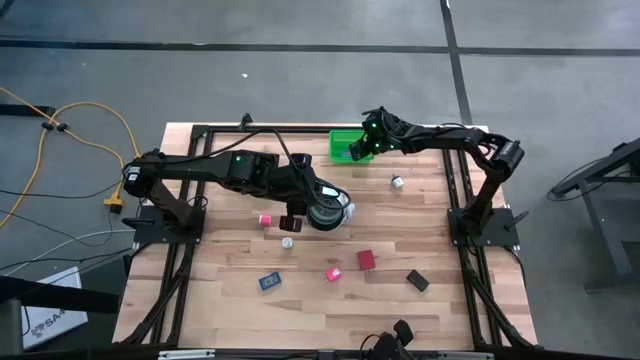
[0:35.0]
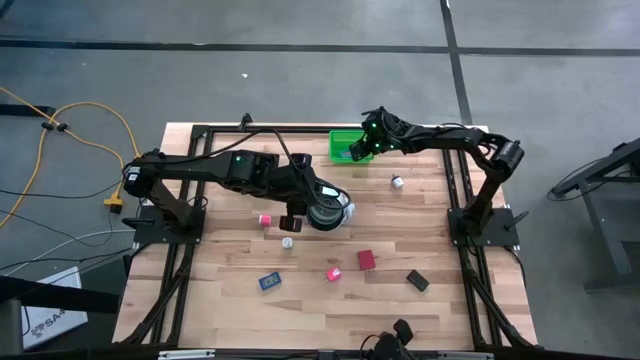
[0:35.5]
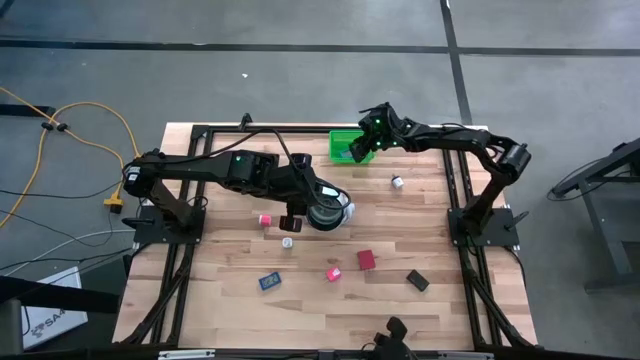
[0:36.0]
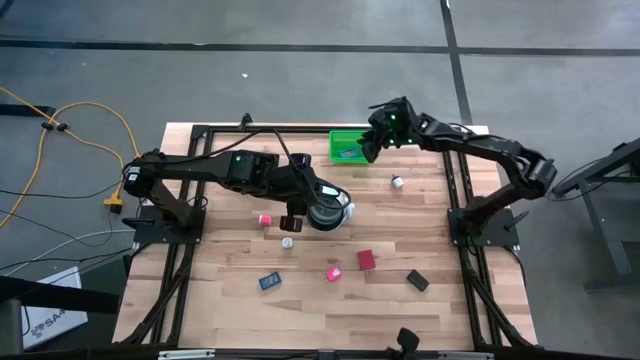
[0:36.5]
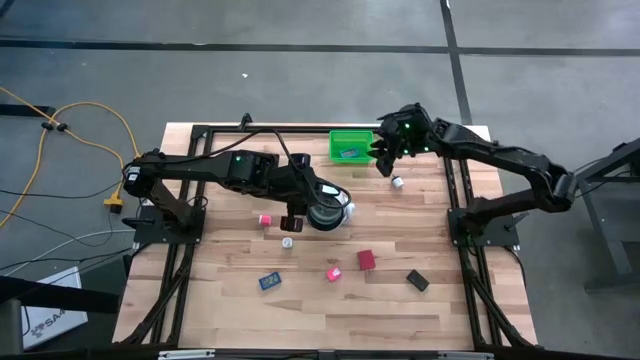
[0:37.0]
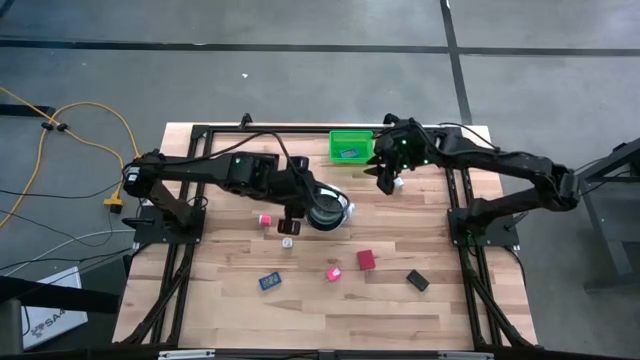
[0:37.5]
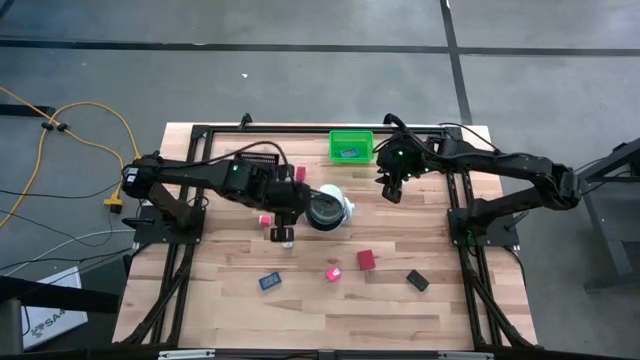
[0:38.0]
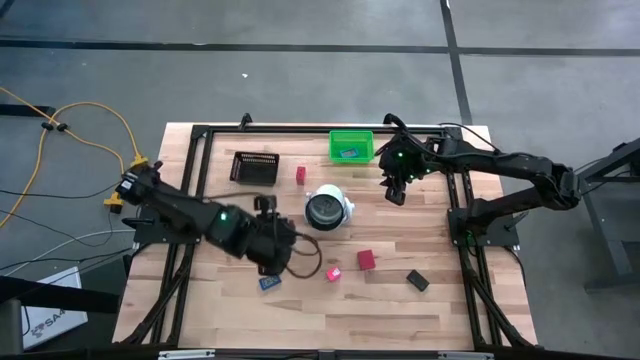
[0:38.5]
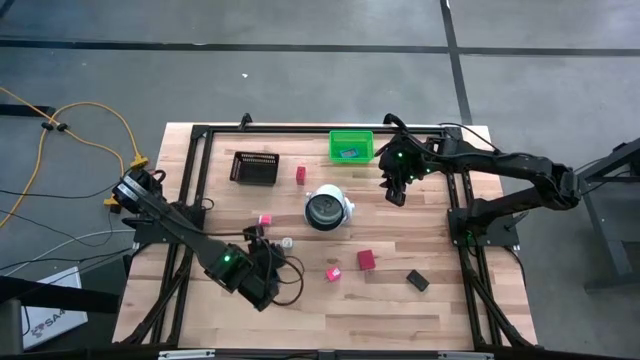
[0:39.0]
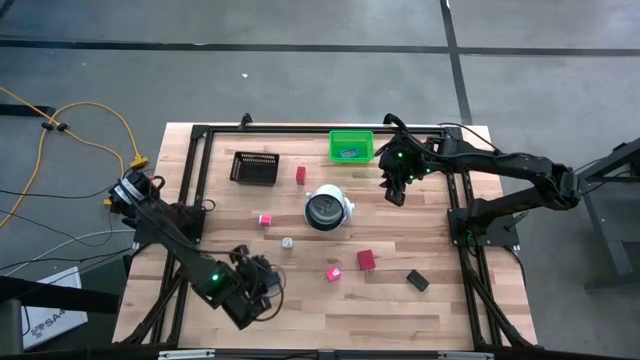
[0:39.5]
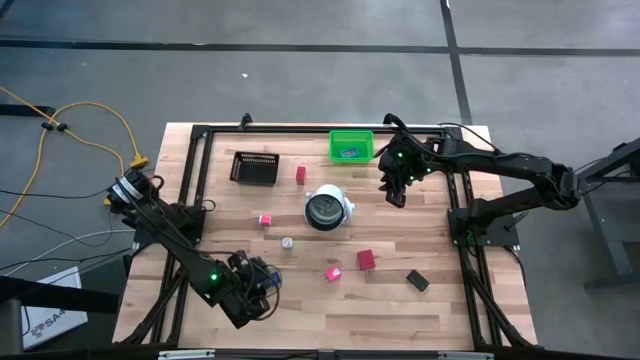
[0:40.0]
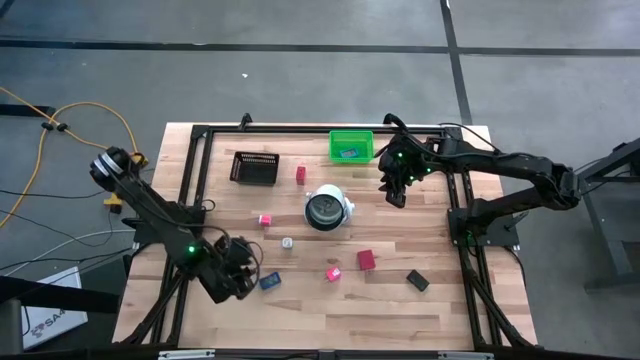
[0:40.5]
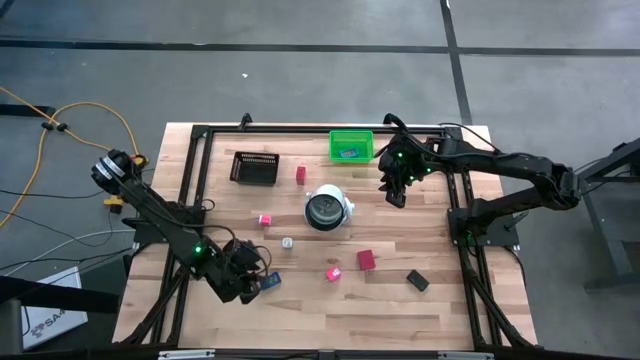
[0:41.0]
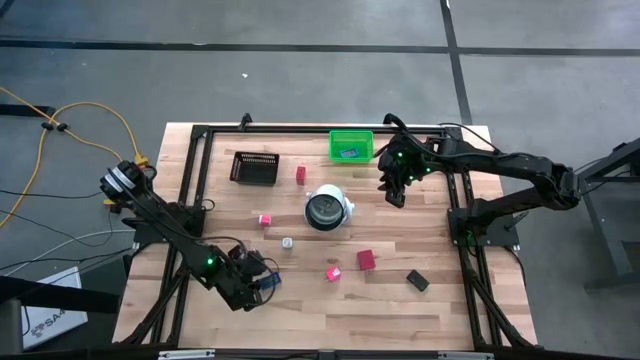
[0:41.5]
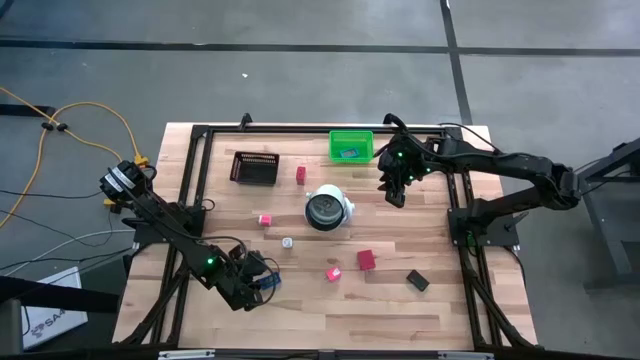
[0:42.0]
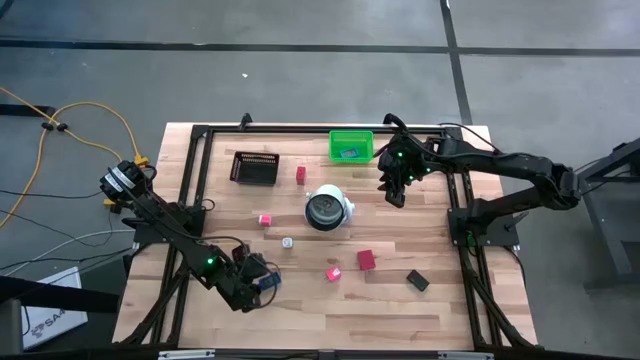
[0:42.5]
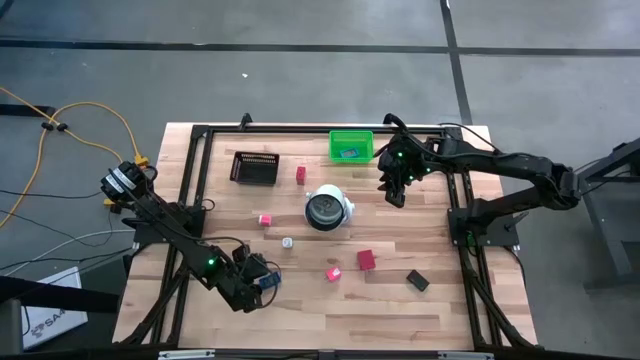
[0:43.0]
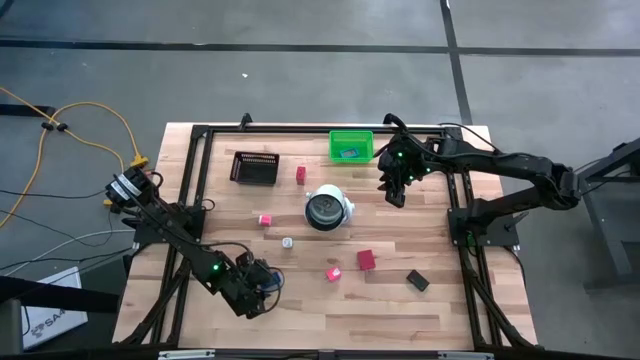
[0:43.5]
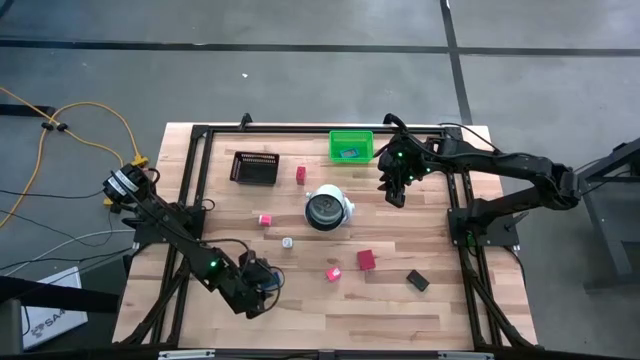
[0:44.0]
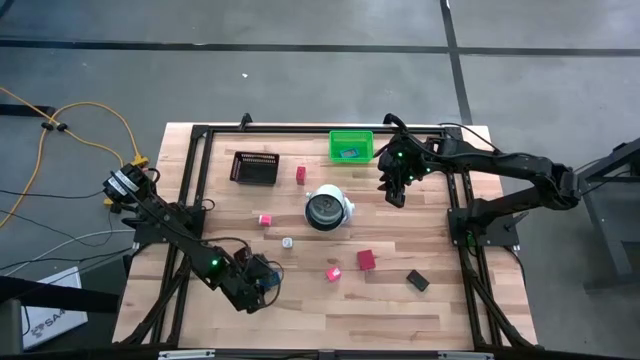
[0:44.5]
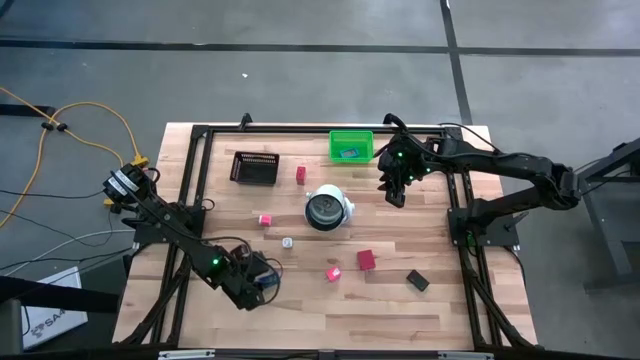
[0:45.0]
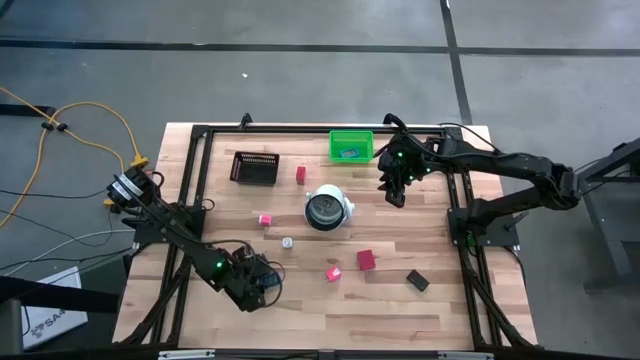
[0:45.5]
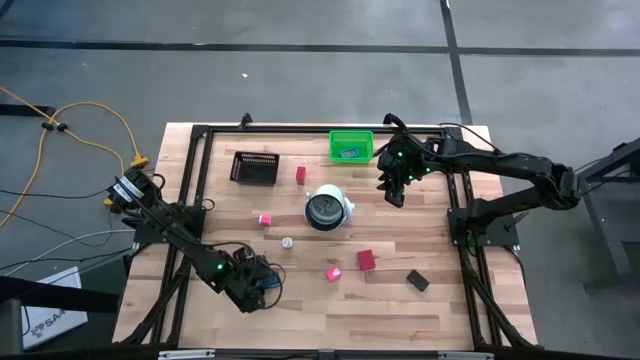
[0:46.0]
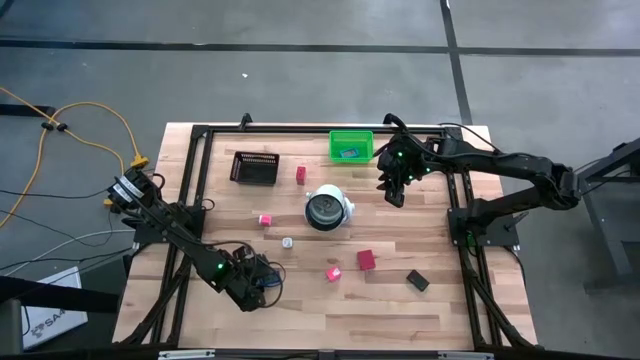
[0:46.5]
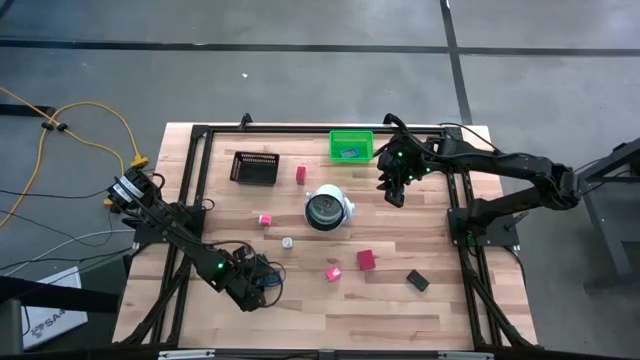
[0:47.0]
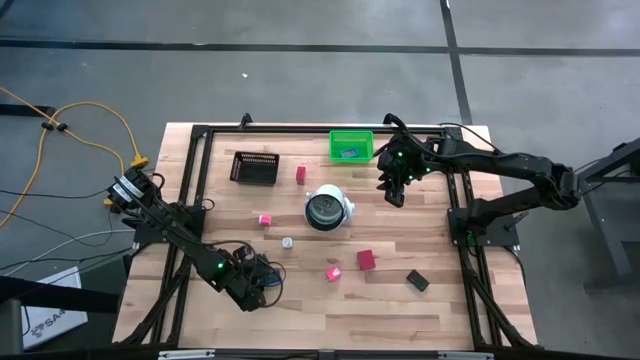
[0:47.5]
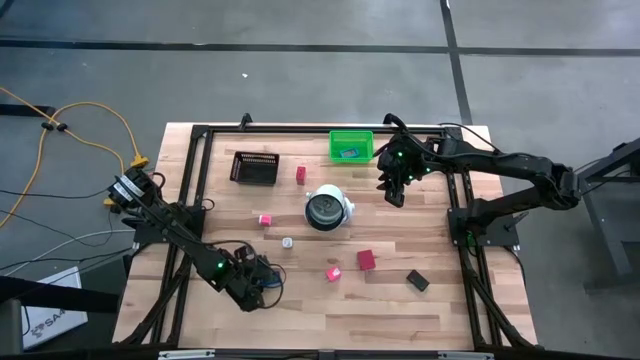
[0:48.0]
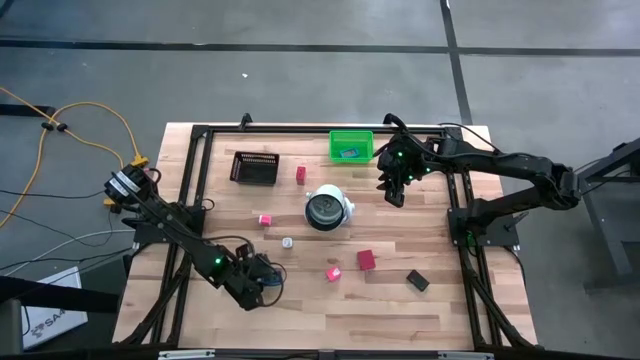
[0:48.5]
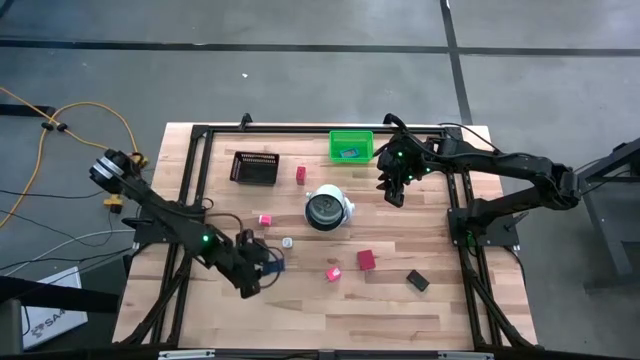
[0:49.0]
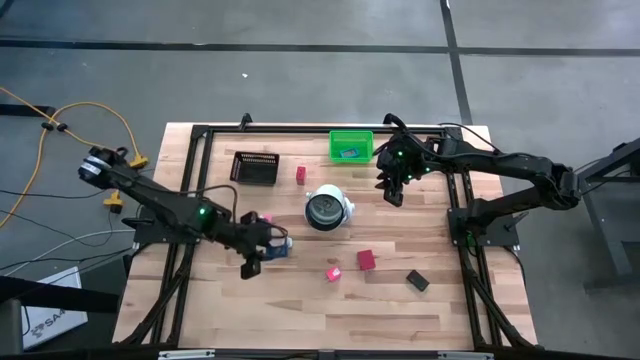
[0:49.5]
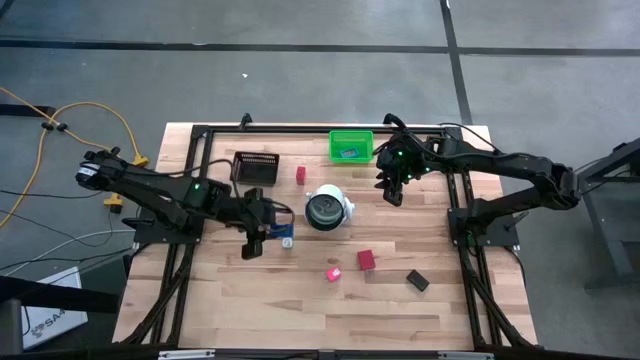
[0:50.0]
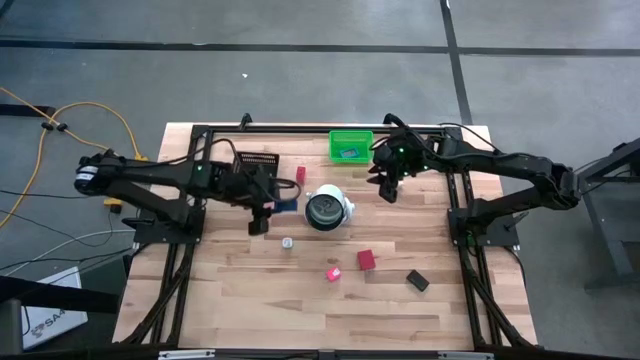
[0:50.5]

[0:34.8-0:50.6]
Task: Pick & Place Office items
Put the blue digital timer into the green bin

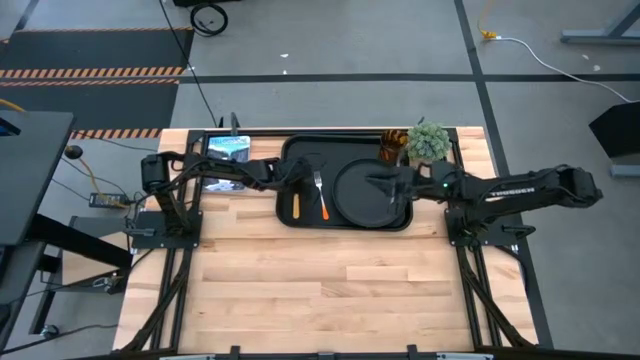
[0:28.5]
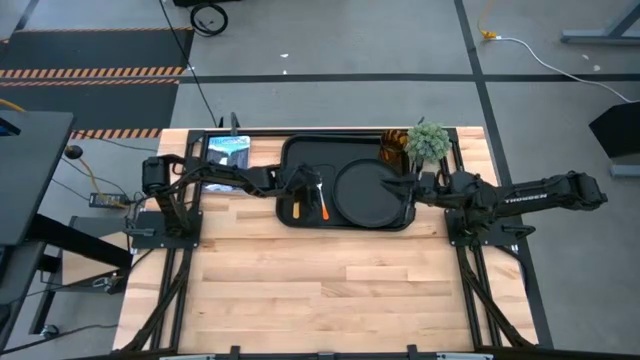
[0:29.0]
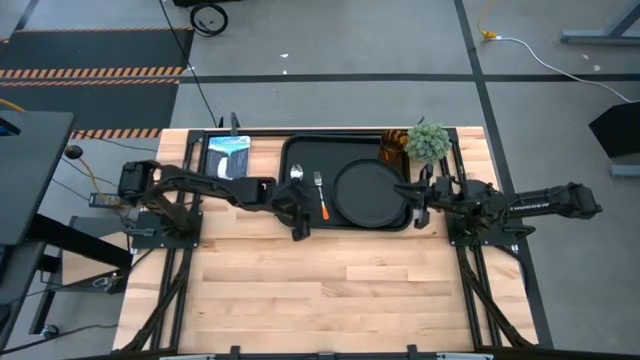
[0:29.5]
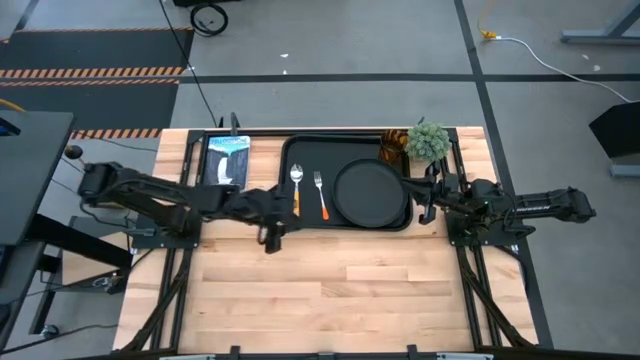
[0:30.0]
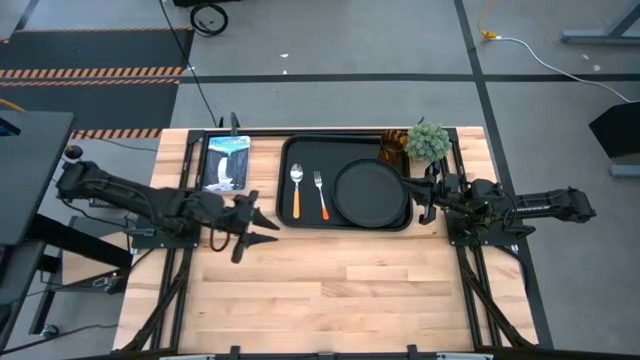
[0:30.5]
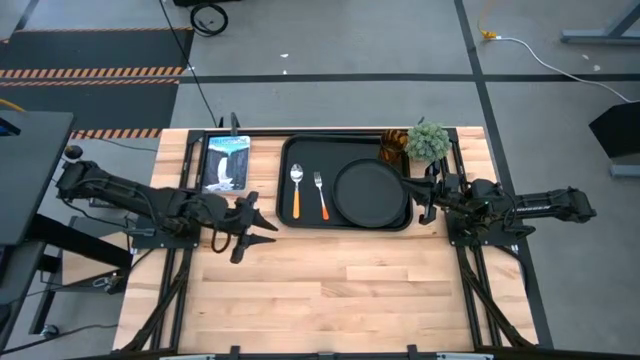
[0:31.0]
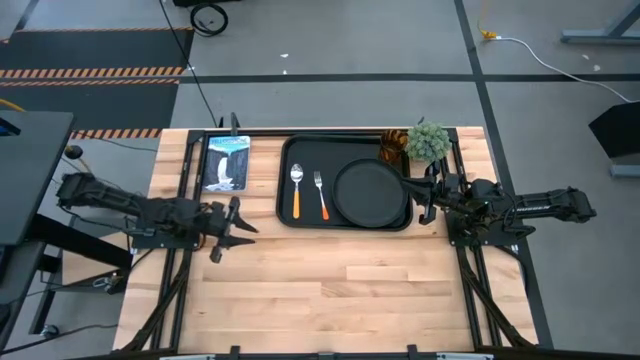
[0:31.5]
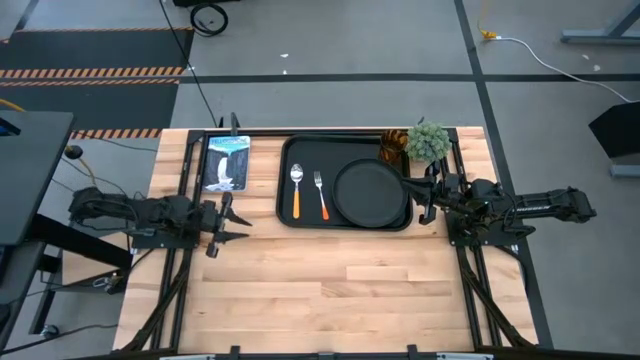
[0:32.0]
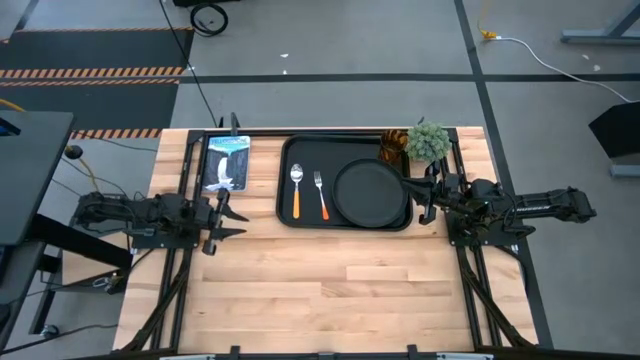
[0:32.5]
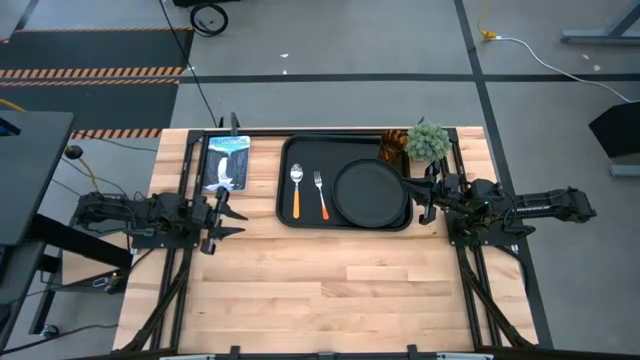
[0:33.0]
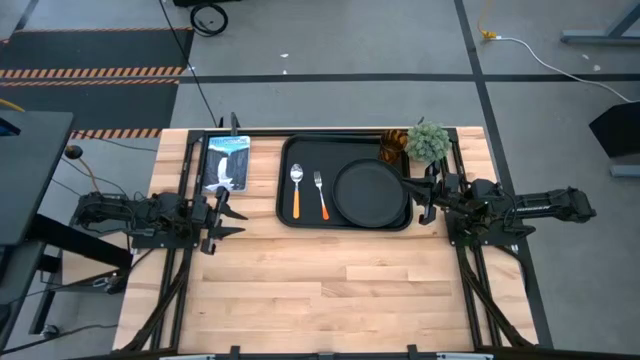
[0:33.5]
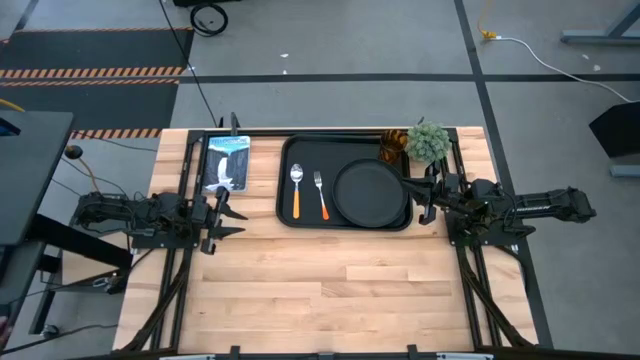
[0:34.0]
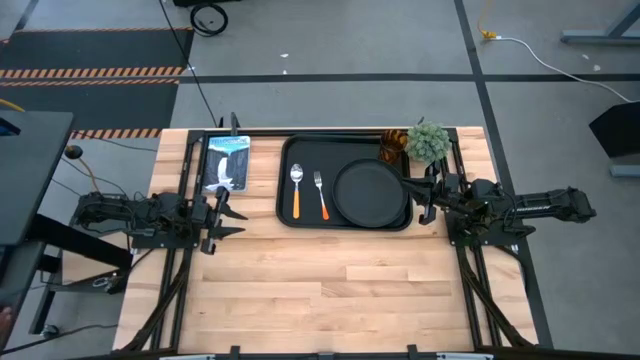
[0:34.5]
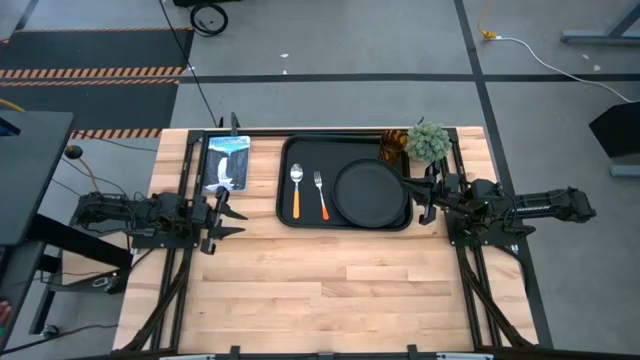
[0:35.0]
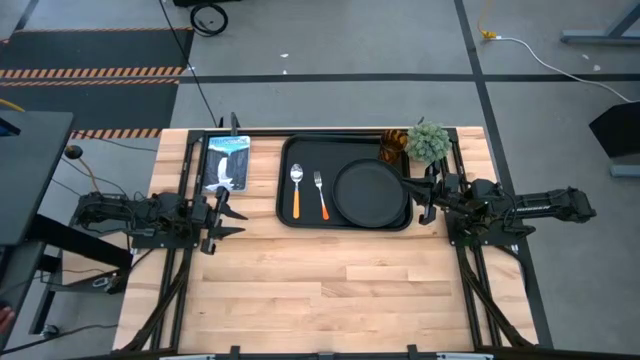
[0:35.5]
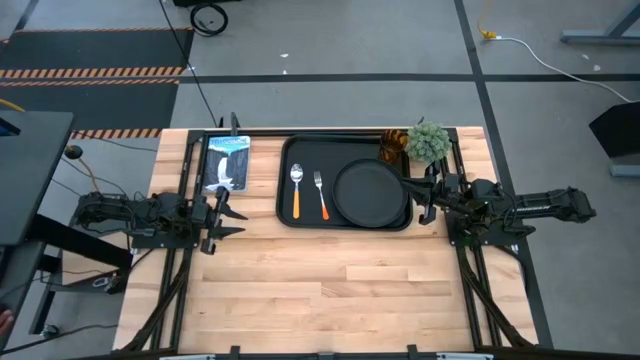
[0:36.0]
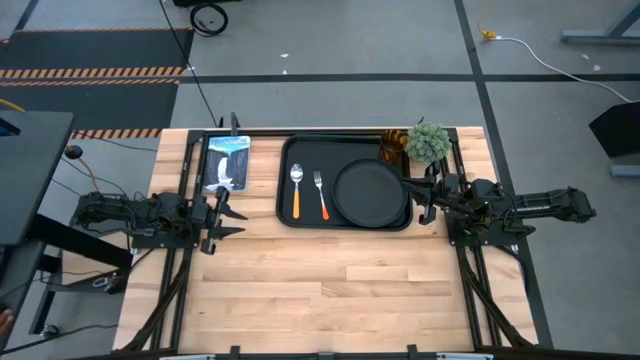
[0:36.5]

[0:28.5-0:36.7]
Task: Pick and place plate/cup/fork/spoon on tray
Return to Home Position
